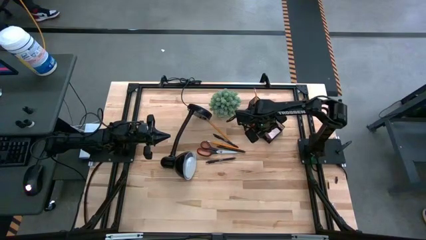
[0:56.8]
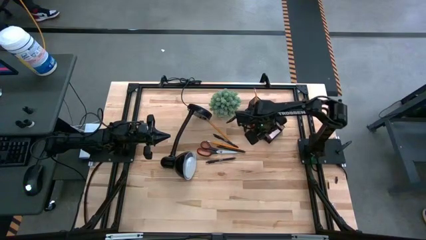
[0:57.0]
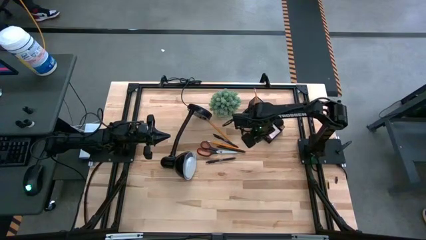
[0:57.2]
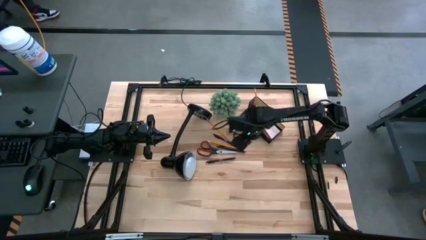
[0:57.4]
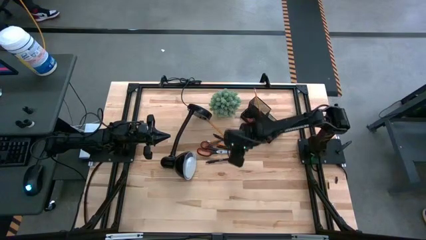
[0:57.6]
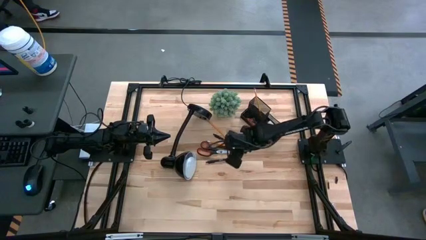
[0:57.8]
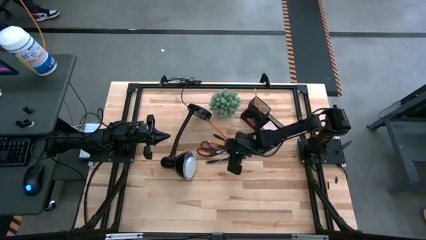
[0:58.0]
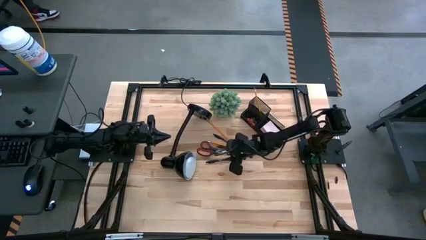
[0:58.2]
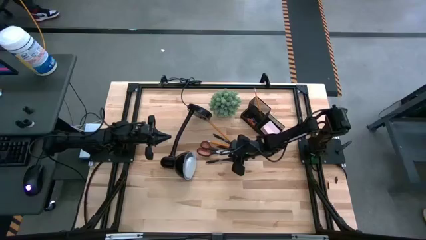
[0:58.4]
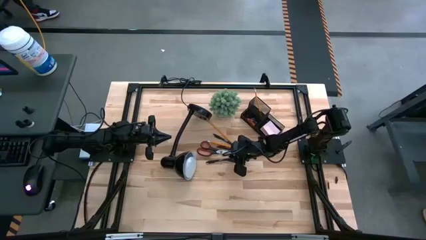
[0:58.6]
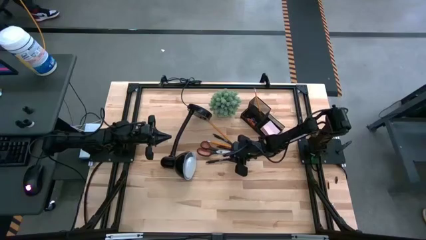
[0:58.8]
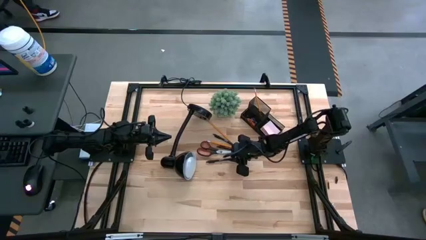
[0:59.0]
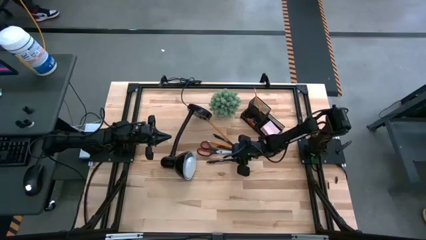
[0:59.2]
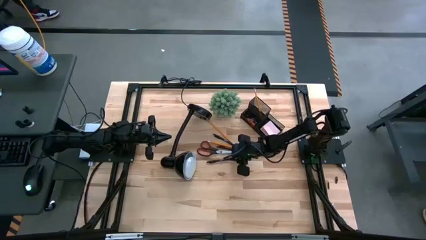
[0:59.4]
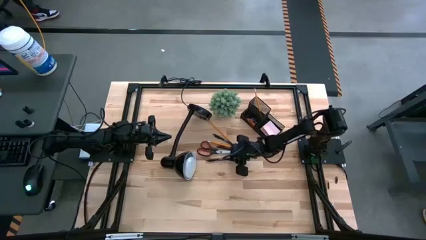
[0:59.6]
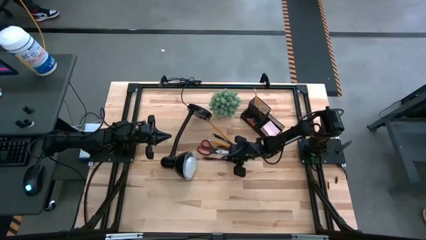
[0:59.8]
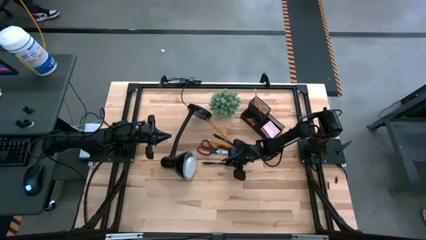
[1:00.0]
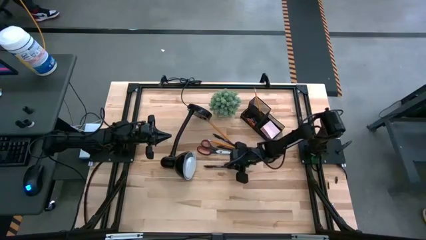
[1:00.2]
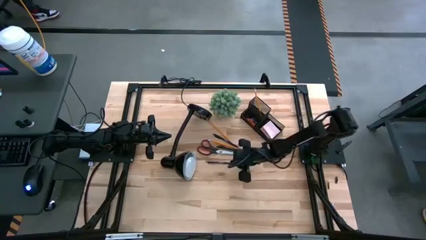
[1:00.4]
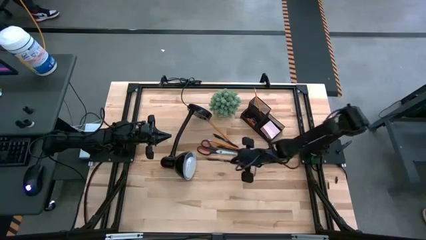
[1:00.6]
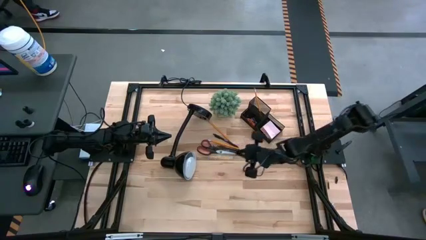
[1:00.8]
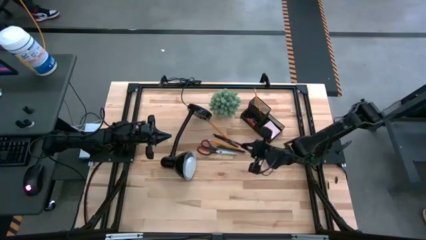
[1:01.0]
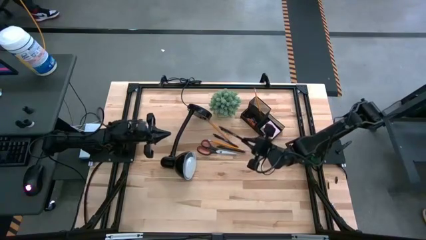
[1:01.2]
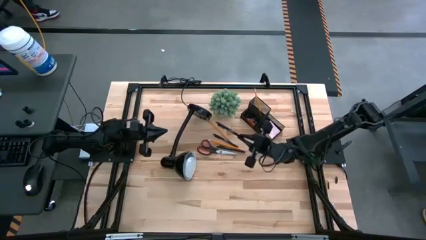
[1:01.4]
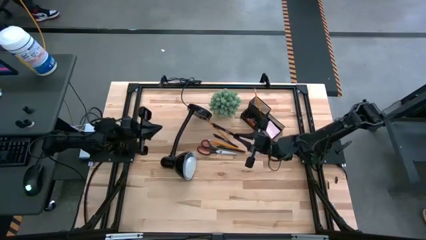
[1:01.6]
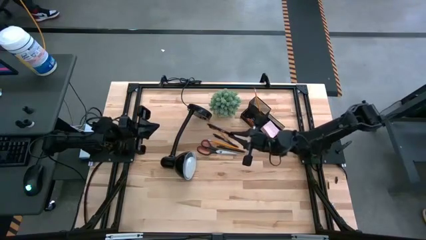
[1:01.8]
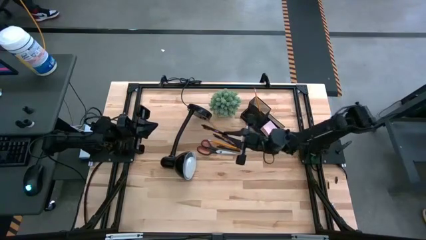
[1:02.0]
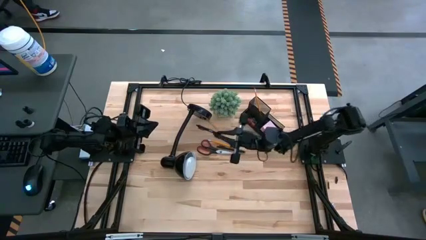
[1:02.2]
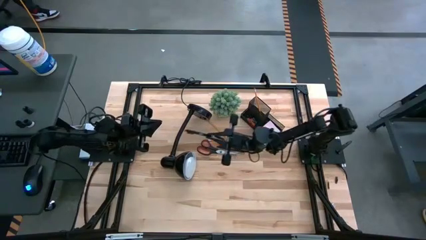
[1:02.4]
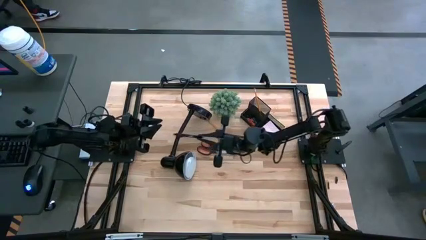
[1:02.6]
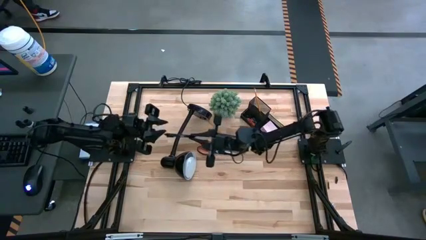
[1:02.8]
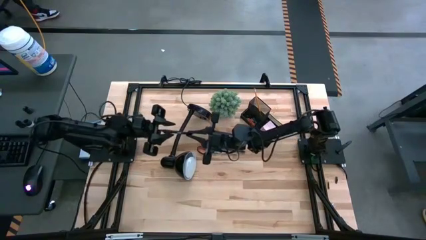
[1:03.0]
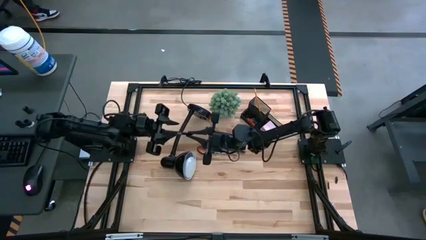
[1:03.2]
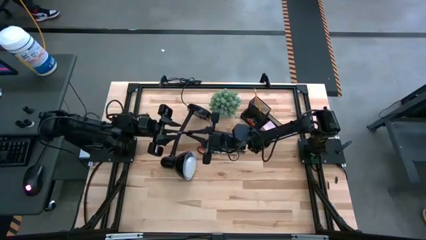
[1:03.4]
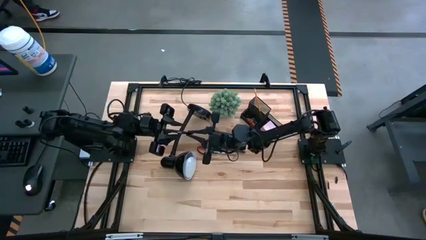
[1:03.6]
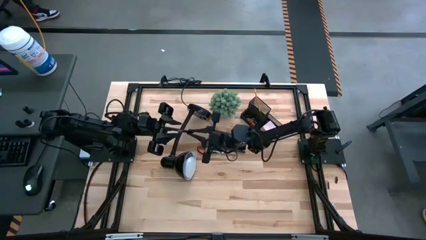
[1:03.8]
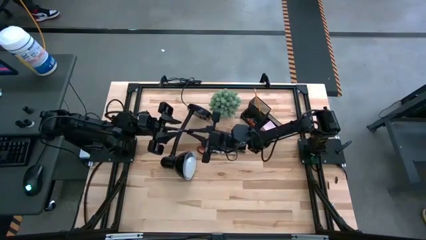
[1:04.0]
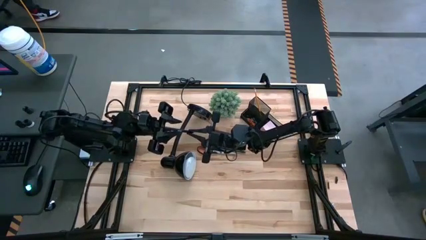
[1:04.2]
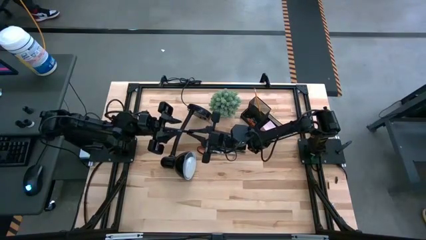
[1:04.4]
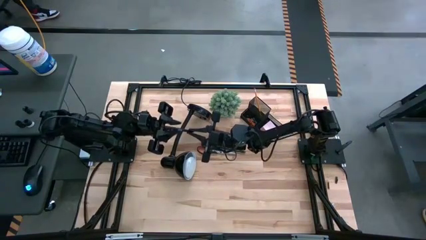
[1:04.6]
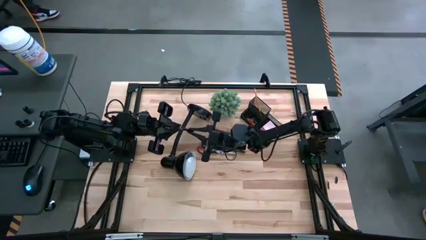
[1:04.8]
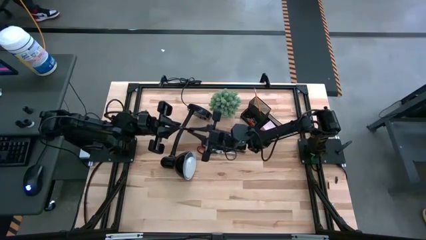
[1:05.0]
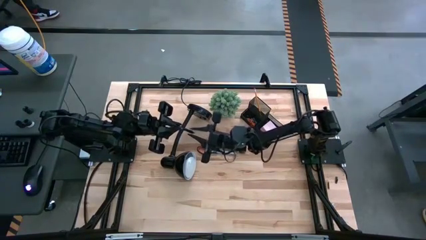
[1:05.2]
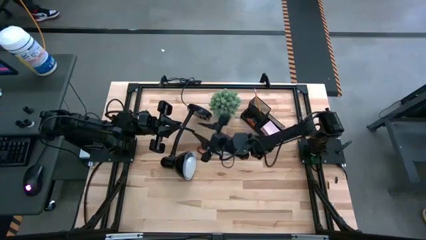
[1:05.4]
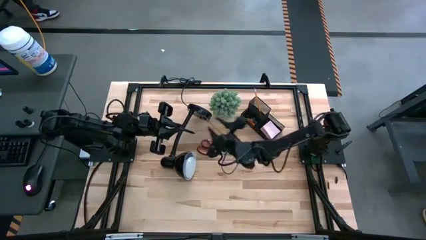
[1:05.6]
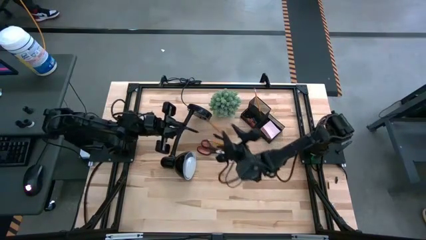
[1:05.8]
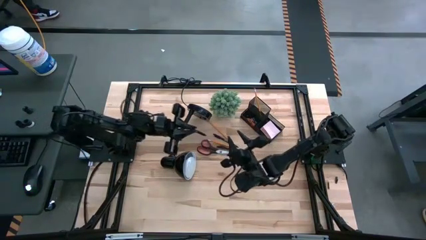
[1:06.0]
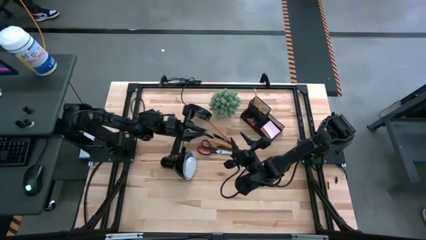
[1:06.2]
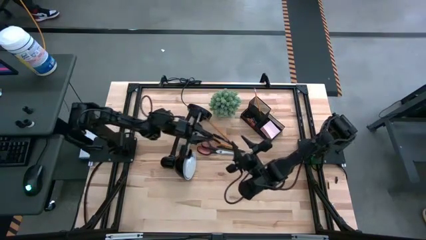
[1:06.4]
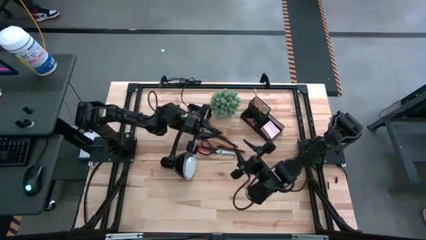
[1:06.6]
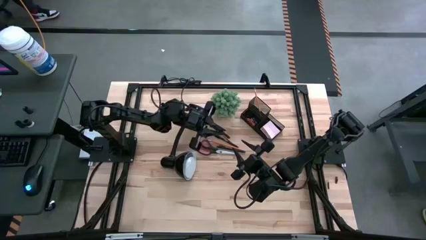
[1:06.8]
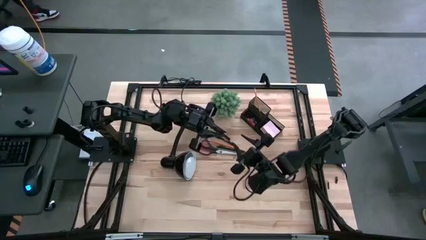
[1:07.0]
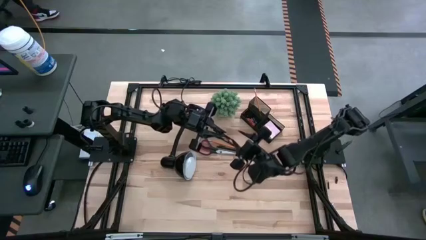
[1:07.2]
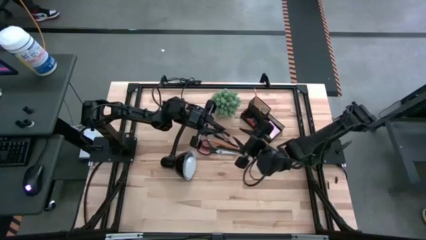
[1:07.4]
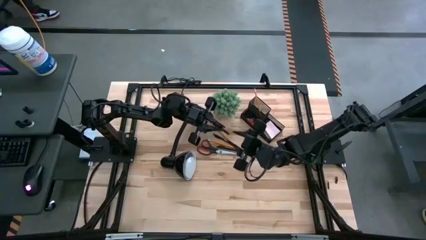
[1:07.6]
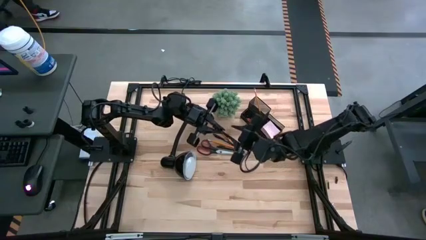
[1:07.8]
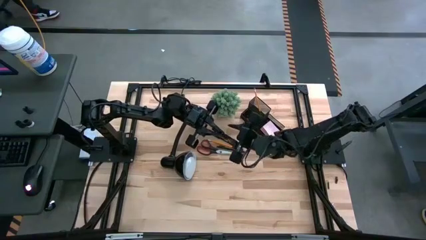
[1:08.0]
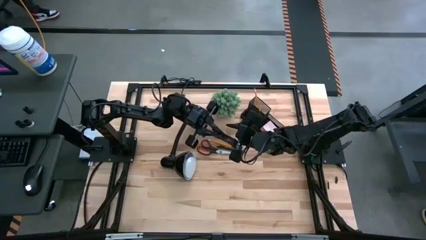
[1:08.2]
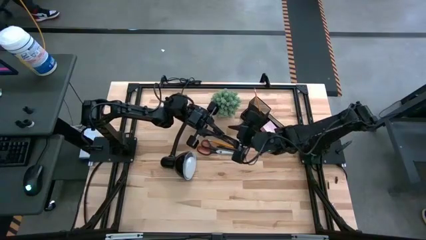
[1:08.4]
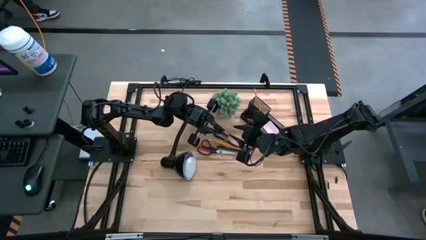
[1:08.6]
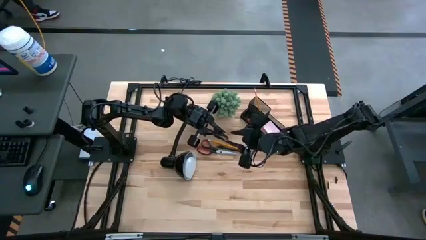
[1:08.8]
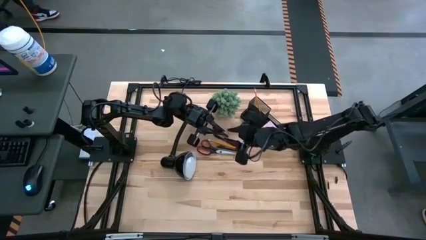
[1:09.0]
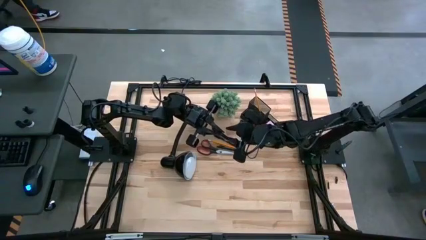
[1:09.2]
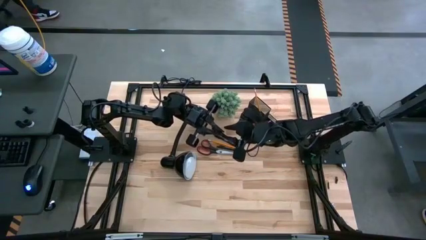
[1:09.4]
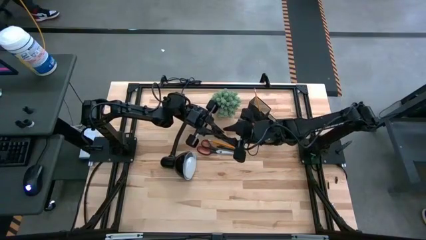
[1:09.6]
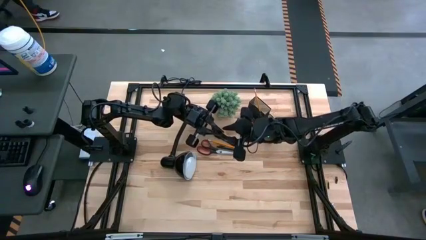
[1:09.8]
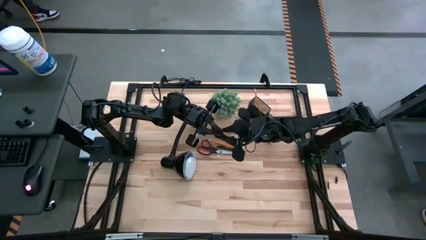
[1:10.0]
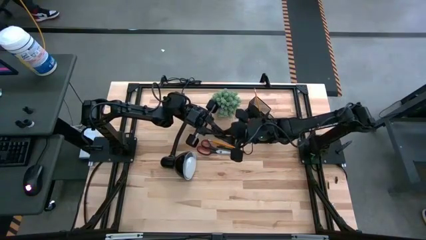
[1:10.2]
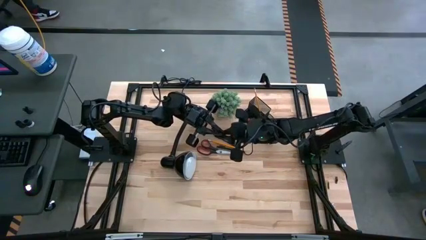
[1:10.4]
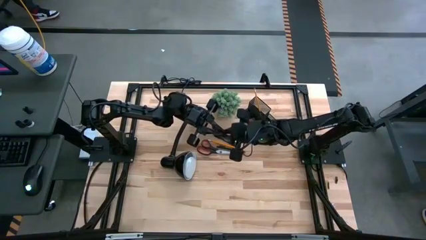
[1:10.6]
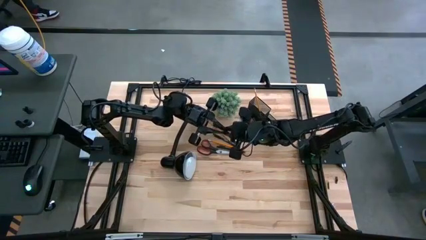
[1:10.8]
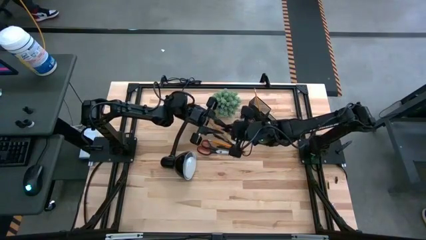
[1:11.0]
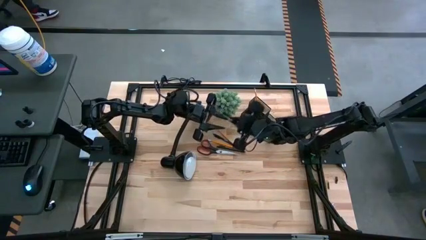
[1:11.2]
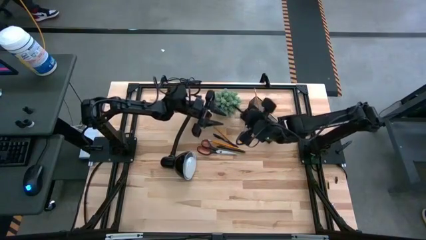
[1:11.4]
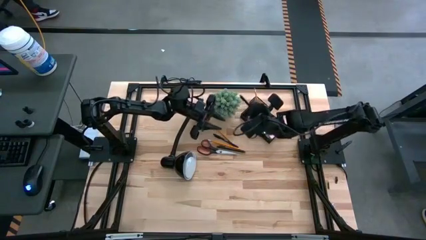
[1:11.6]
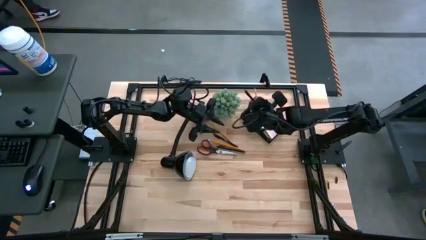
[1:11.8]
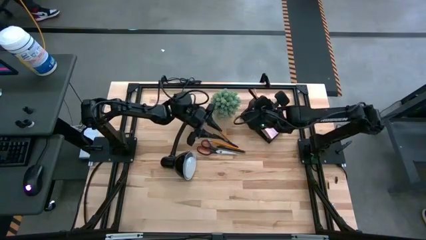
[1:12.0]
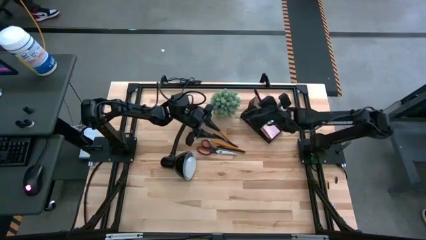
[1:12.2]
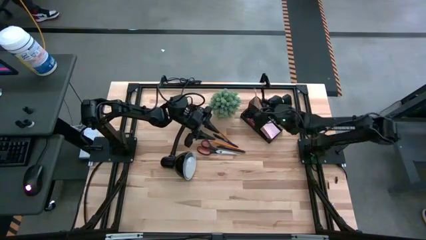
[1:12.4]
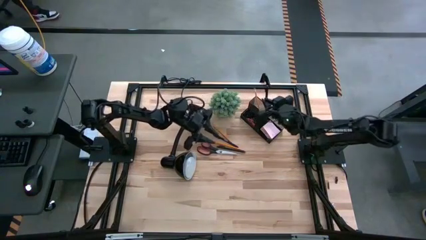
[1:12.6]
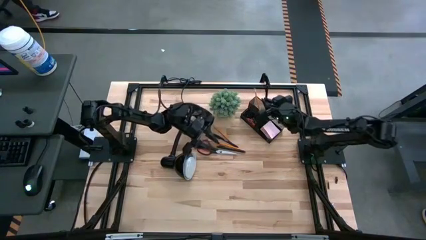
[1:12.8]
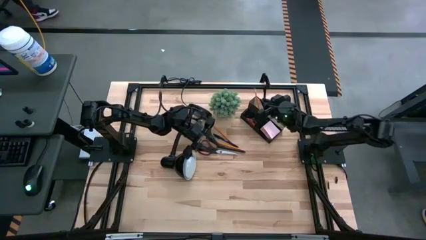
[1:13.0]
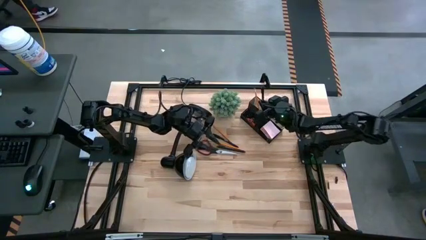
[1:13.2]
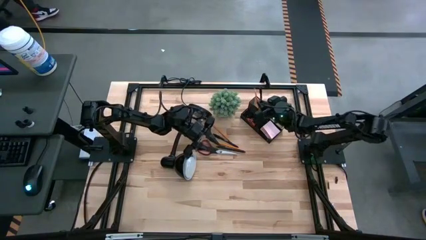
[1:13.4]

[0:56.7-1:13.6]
Task: Pick and place office supplies into organizer
Put the bottom pen into the top left section of the desk organizer
